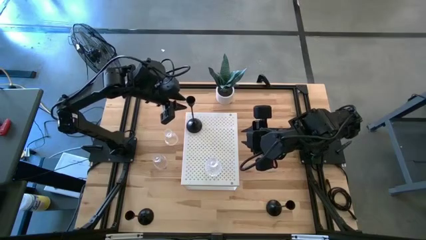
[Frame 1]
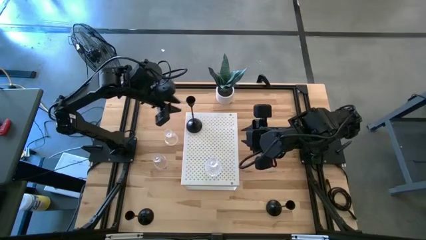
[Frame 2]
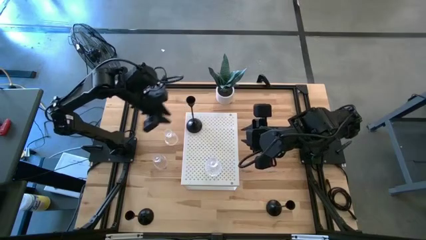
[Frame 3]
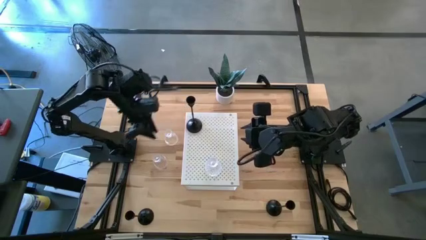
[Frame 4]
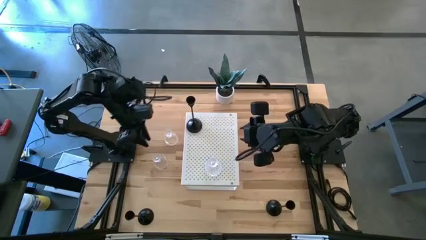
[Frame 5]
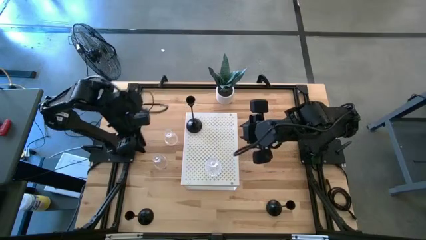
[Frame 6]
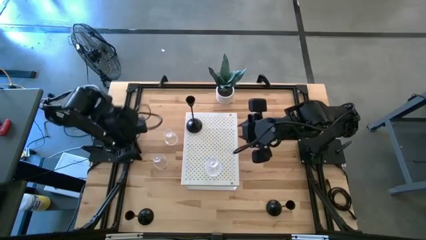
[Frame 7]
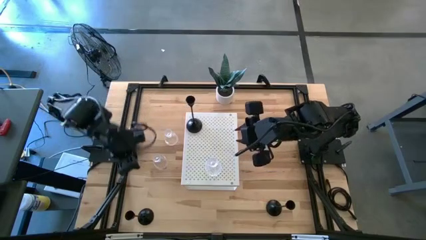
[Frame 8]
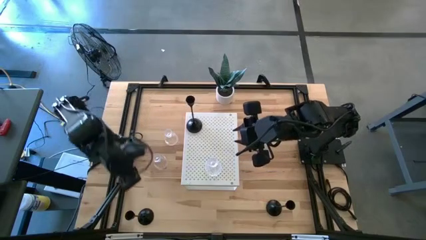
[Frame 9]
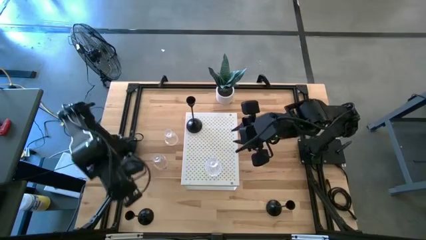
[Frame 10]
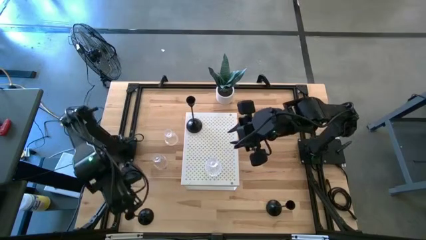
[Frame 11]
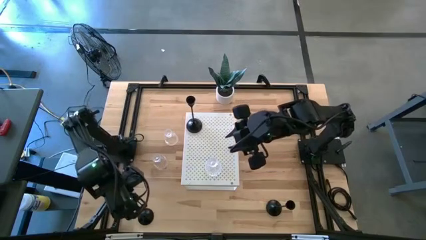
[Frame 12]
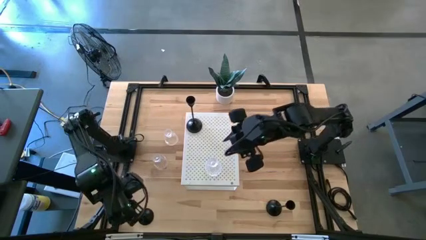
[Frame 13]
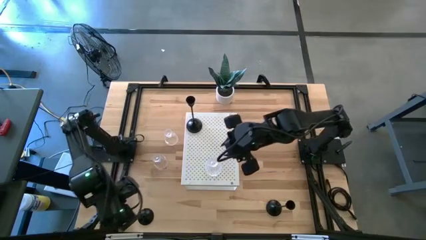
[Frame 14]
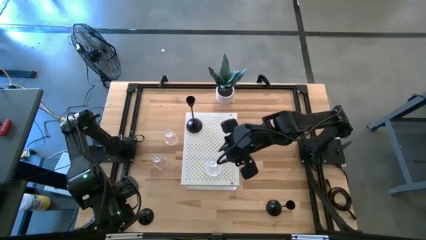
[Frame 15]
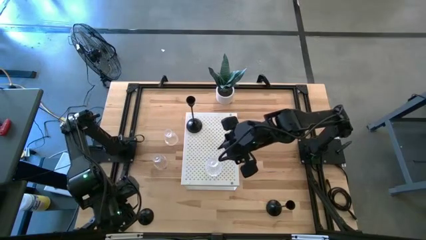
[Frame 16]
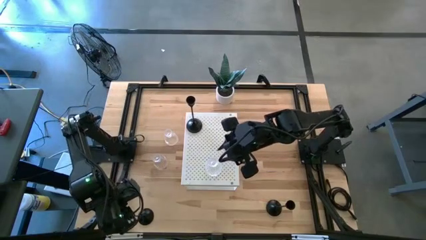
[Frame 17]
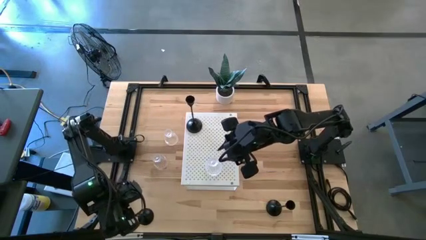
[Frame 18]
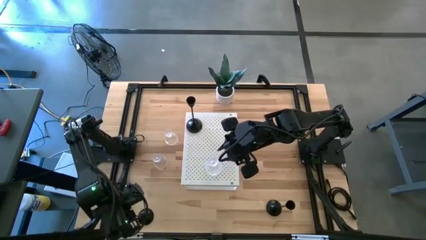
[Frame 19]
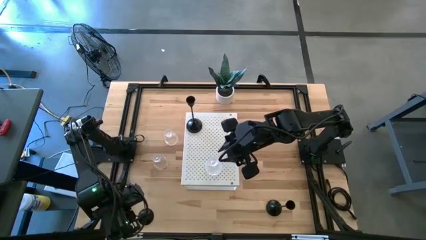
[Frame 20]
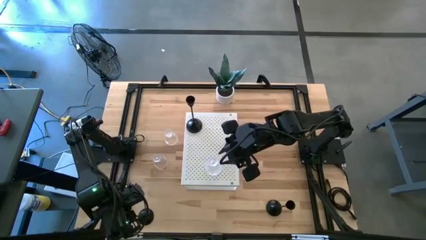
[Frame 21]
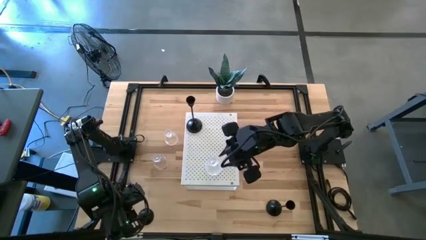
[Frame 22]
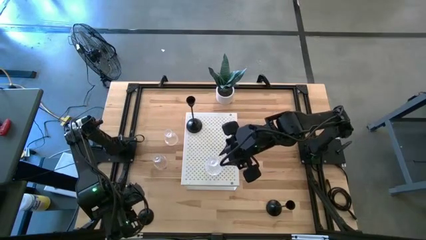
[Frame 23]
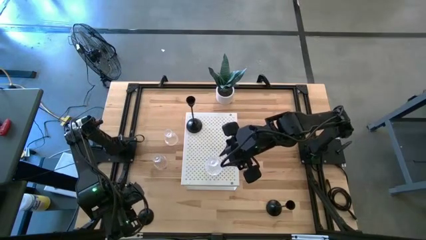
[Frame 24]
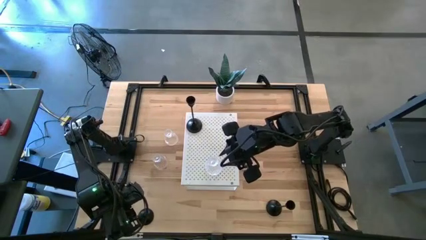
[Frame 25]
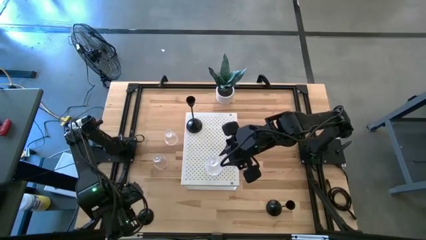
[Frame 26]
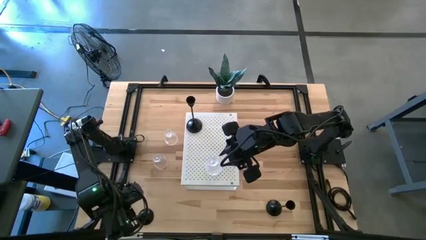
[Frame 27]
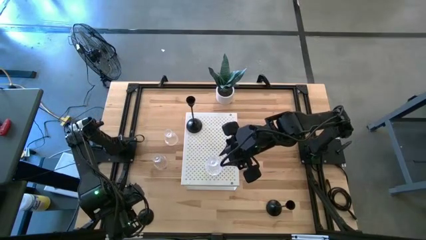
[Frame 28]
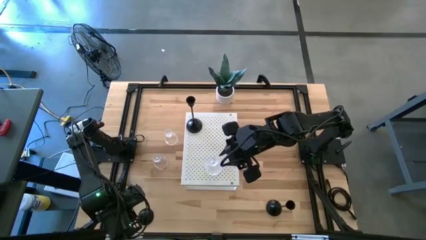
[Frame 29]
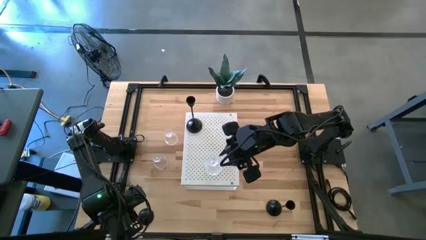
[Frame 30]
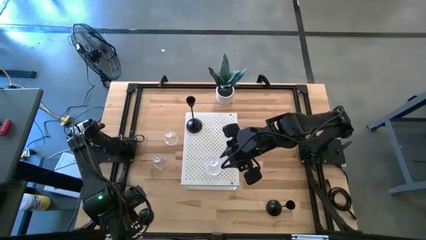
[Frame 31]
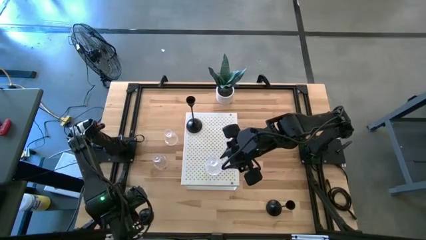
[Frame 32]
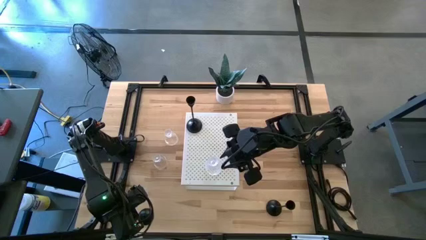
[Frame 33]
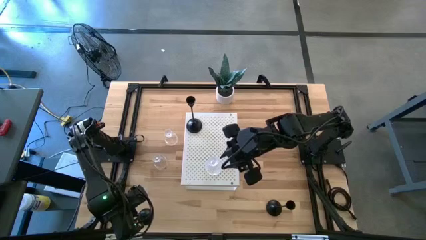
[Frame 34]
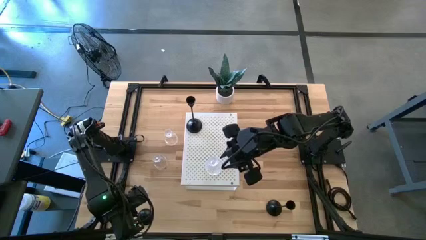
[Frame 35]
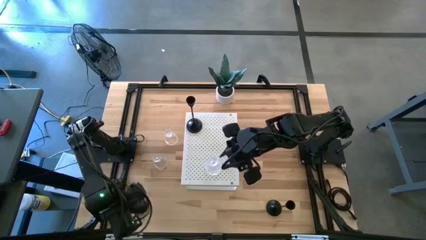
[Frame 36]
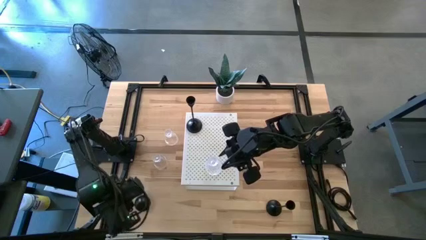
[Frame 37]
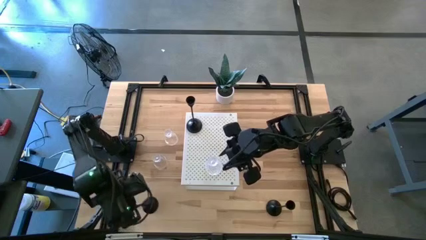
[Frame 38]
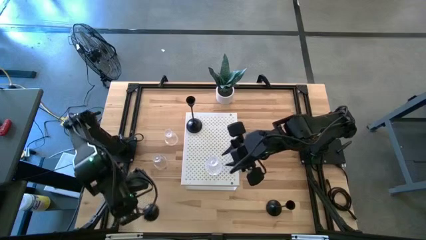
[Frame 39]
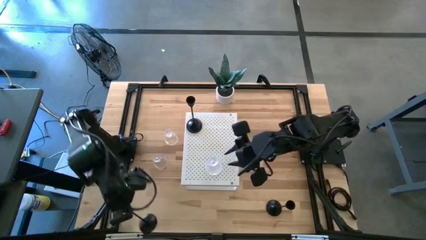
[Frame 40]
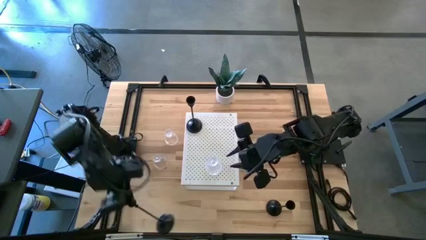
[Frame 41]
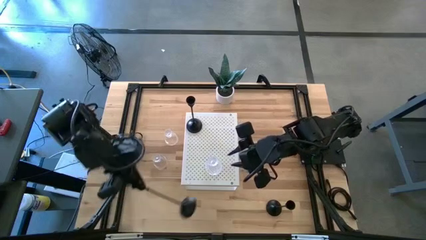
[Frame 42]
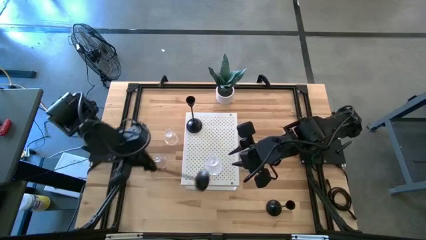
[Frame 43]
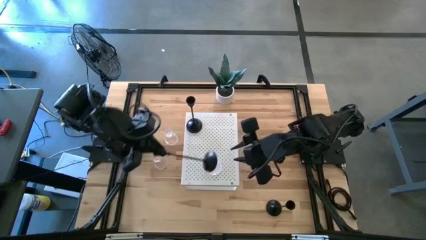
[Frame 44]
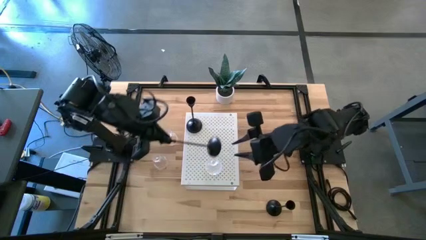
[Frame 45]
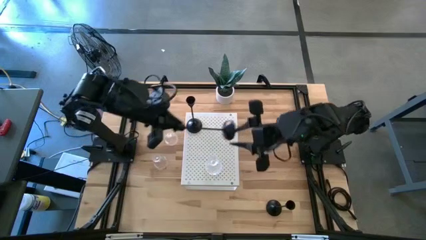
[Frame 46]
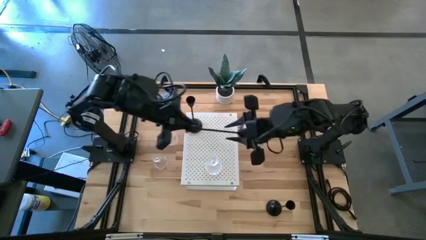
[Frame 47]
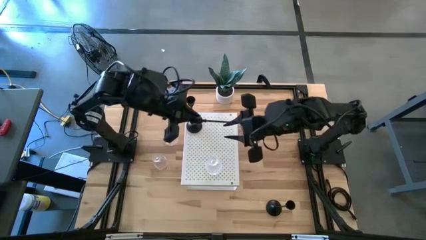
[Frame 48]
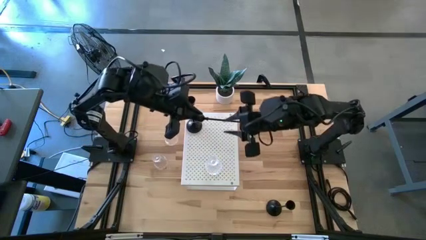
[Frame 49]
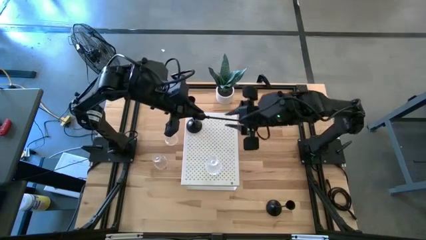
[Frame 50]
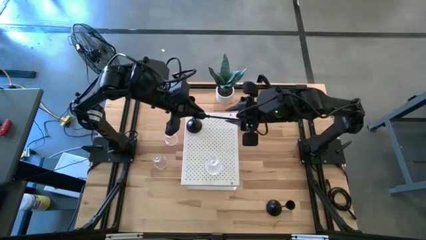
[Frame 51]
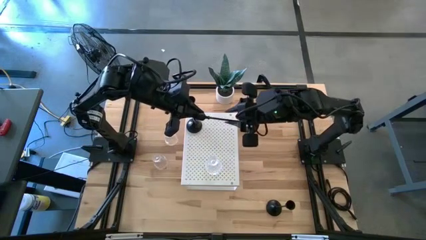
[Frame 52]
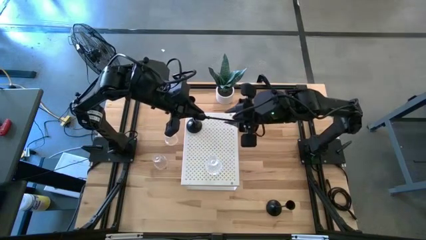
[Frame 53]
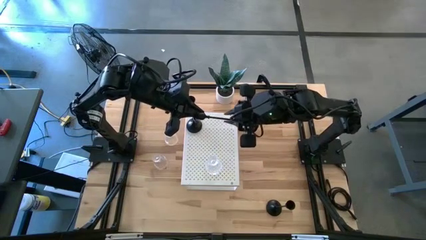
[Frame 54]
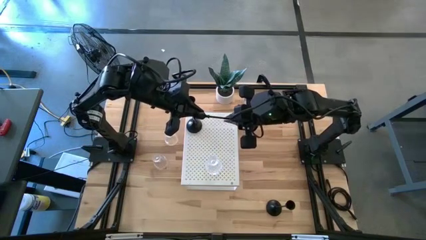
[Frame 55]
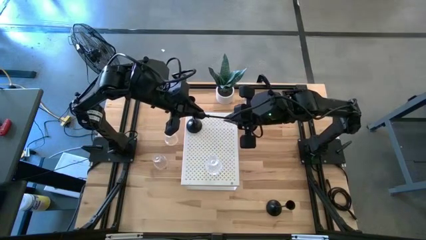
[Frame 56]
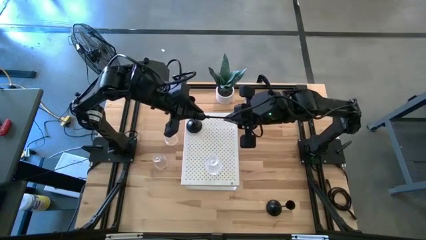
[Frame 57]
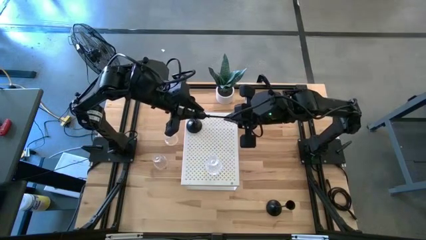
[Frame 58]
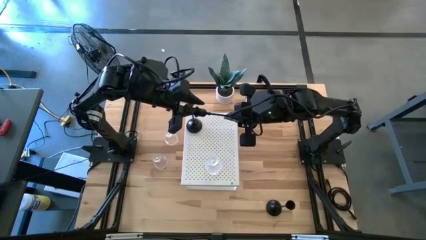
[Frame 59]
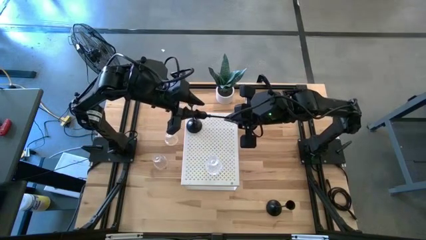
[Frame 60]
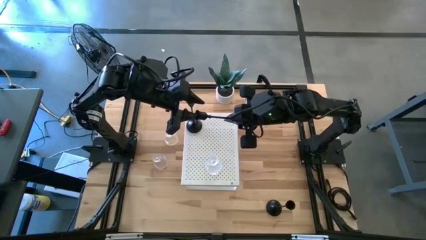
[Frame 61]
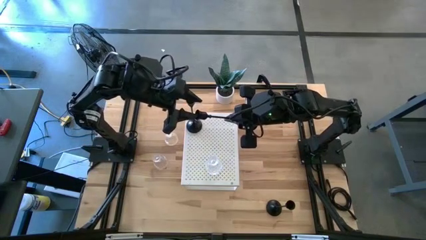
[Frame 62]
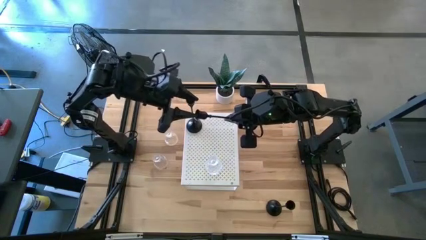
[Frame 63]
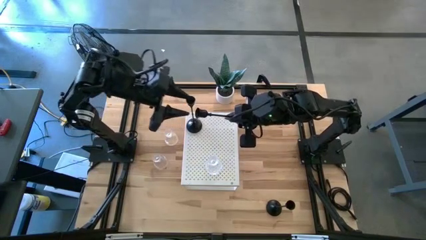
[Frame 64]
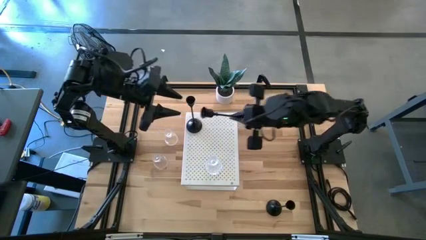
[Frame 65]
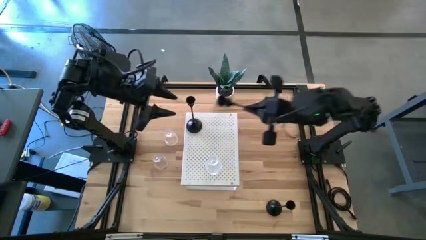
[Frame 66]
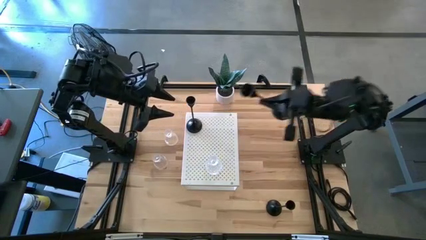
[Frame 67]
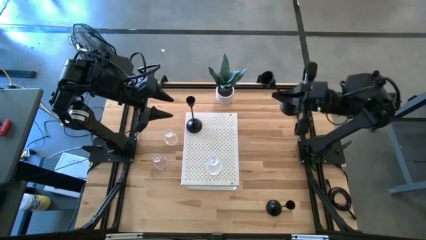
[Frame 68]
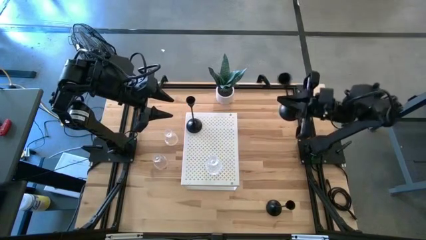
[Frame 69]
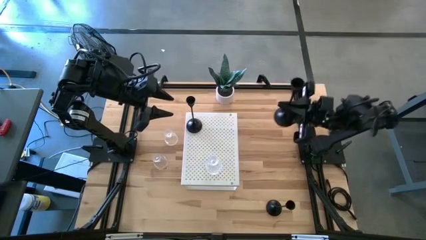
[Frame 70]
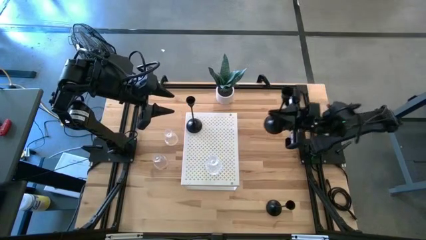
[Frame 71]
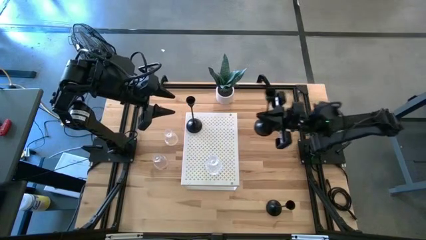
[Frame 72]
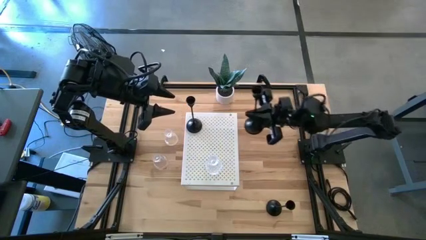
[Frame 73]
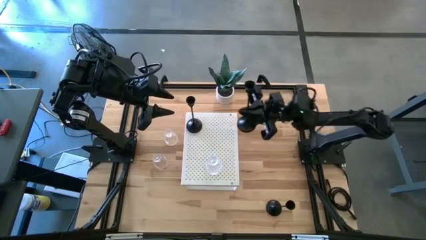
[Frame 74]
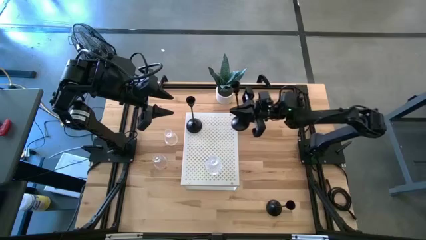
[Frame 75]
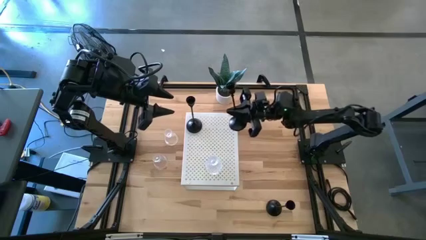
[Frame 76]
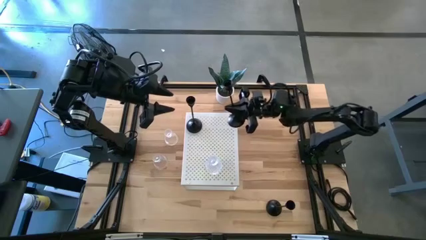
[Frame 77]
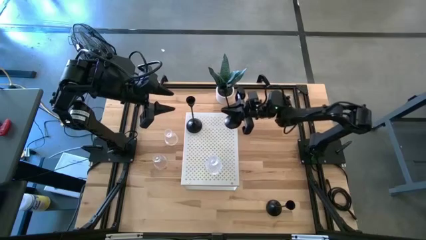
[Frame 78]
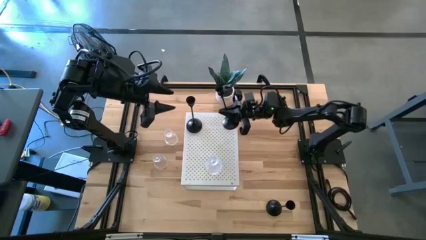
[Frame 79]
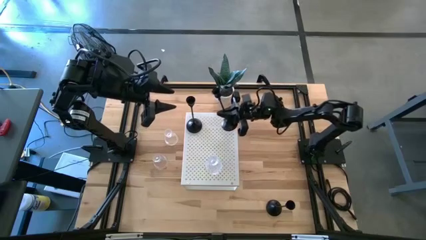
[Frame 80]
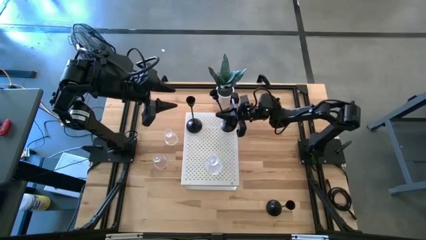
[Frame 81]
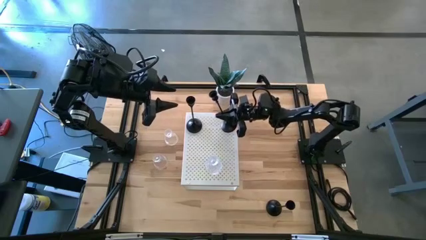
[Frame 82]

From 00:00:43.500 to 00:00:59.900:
Task: Pick & Place candle stick holders
Put the bottom left black candle holder on the shelf
